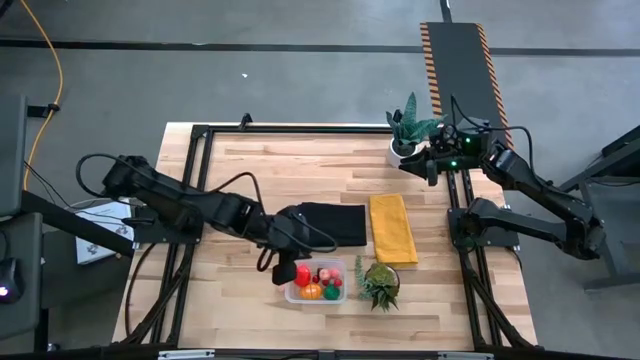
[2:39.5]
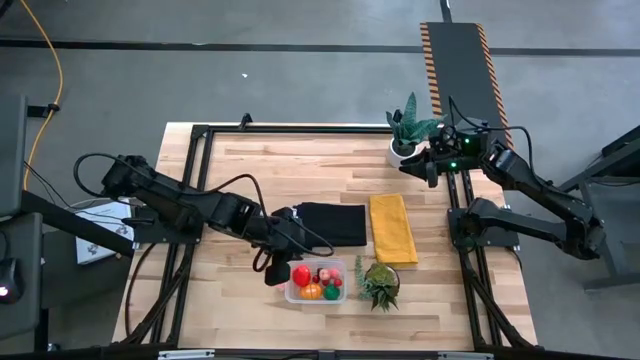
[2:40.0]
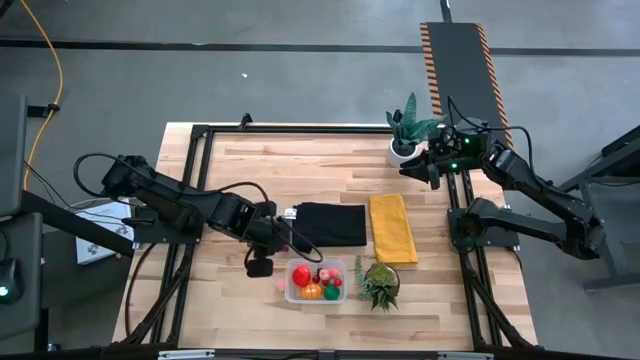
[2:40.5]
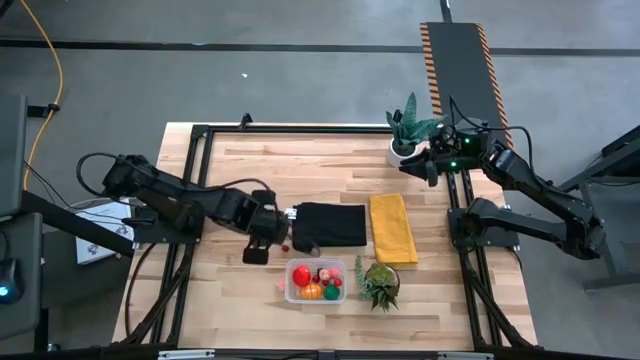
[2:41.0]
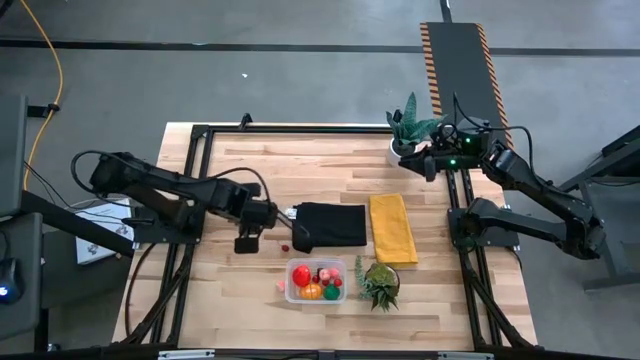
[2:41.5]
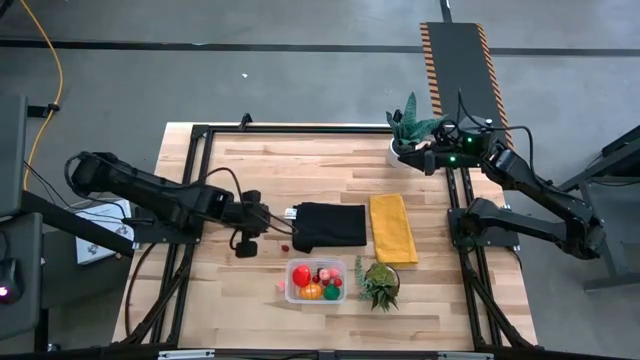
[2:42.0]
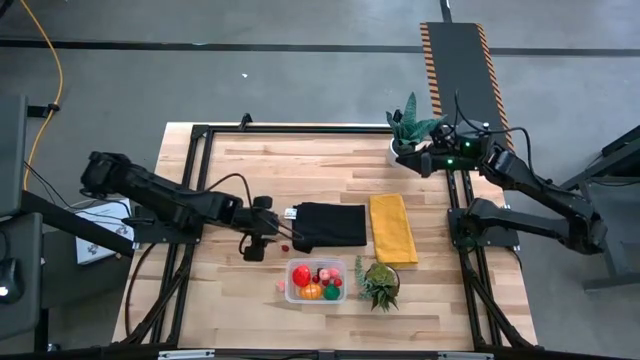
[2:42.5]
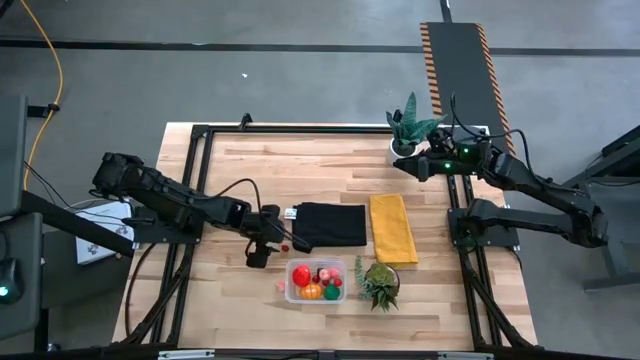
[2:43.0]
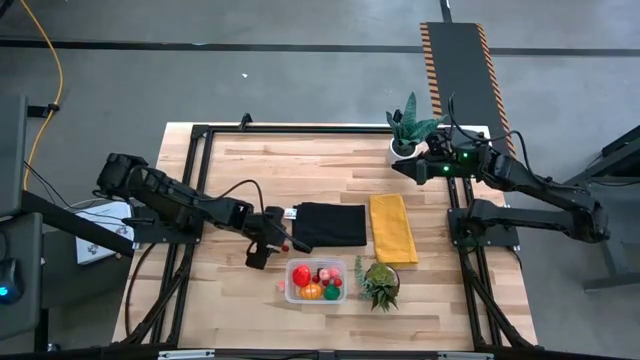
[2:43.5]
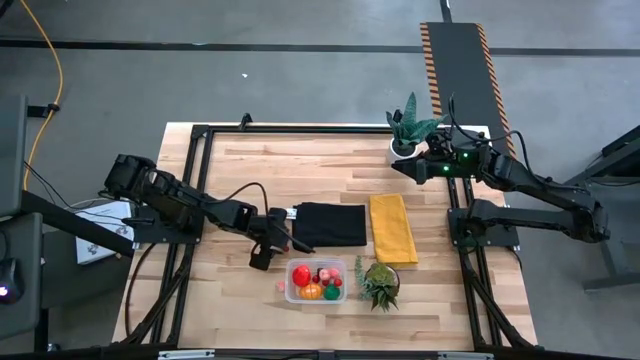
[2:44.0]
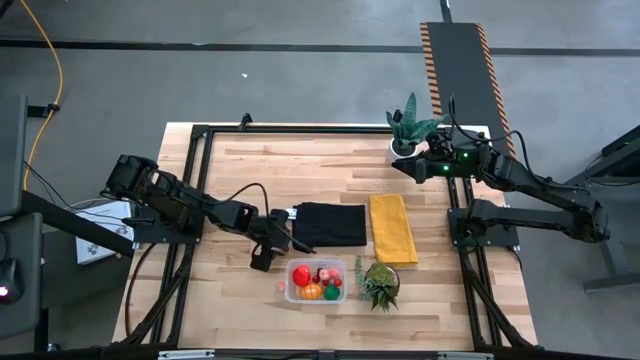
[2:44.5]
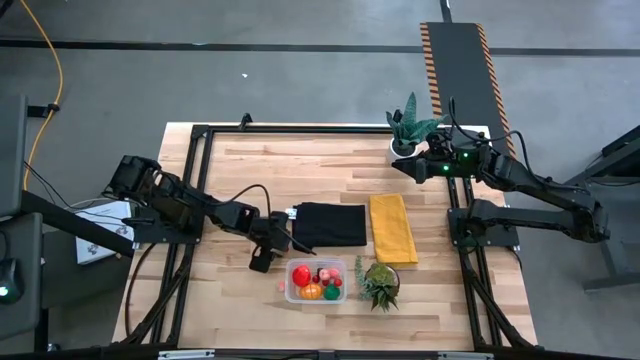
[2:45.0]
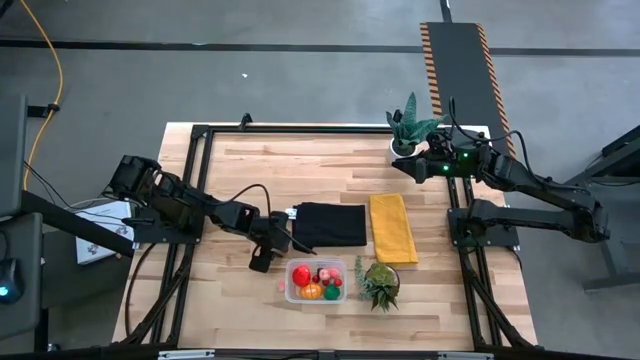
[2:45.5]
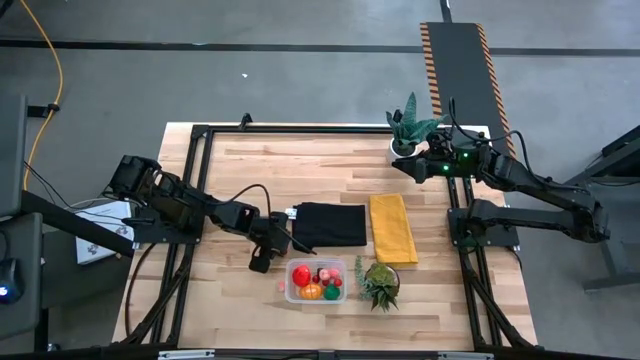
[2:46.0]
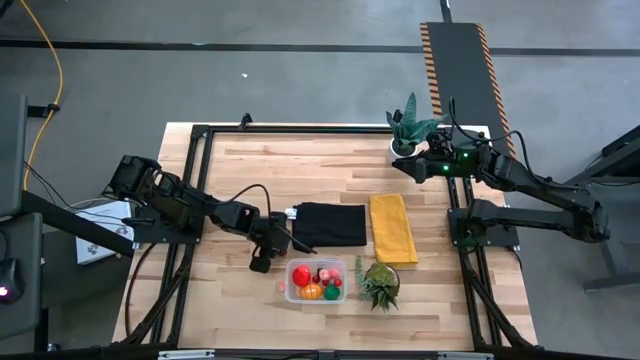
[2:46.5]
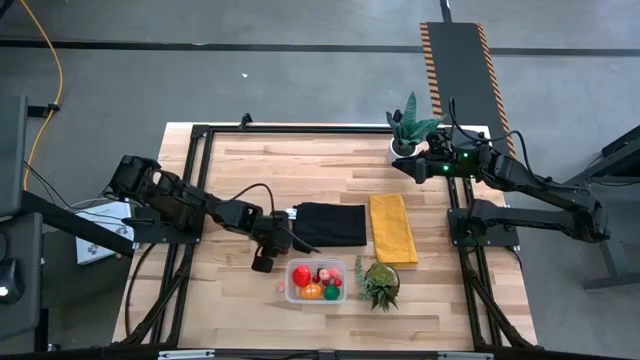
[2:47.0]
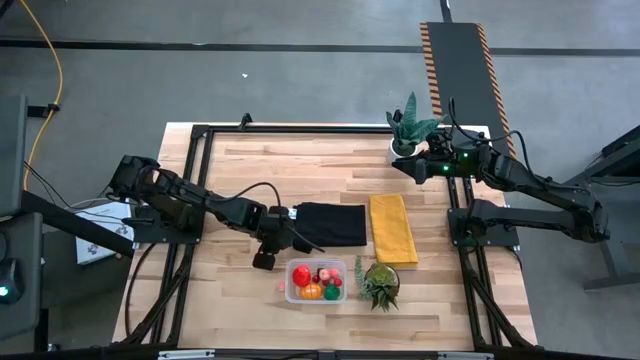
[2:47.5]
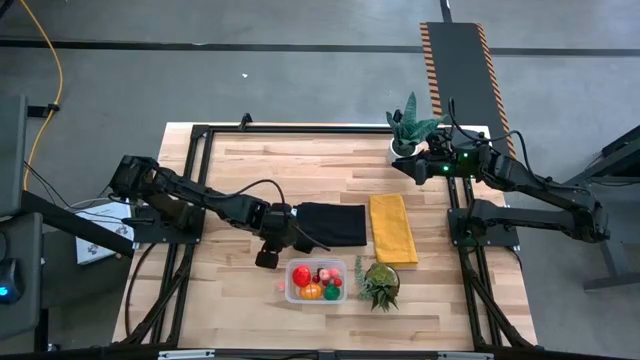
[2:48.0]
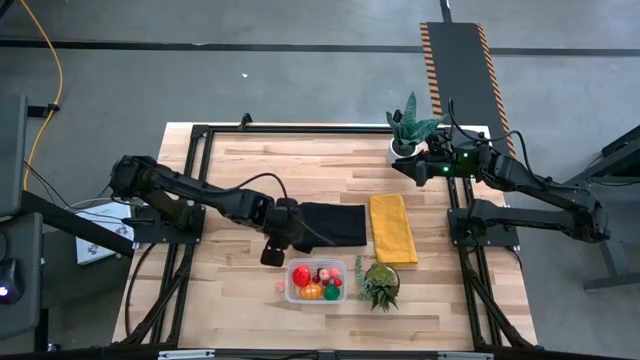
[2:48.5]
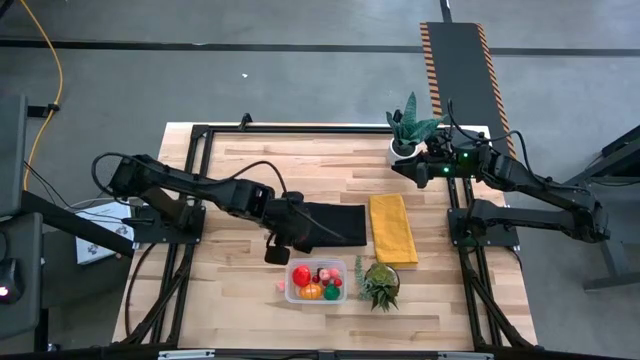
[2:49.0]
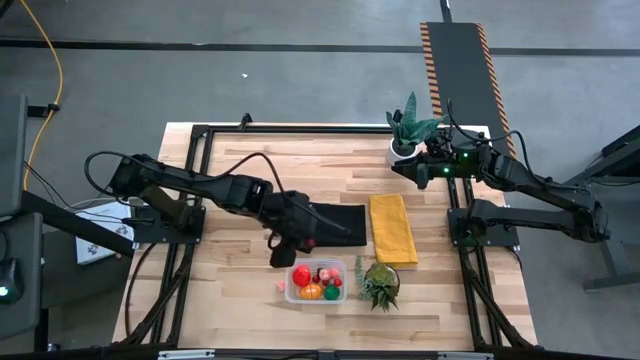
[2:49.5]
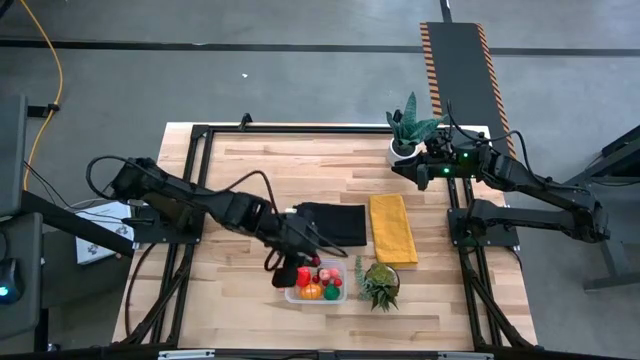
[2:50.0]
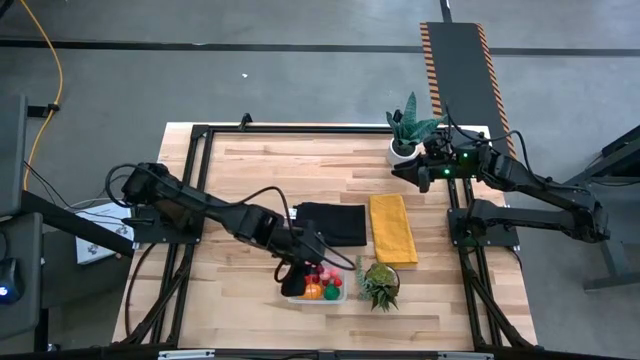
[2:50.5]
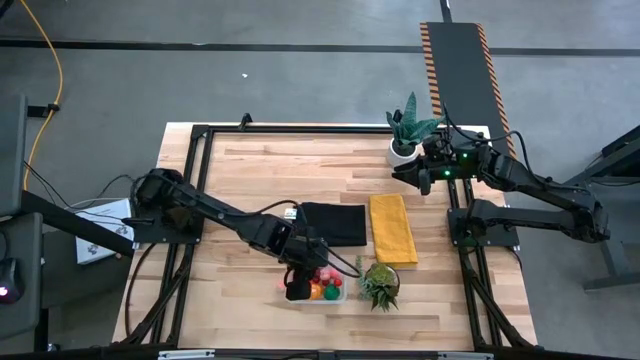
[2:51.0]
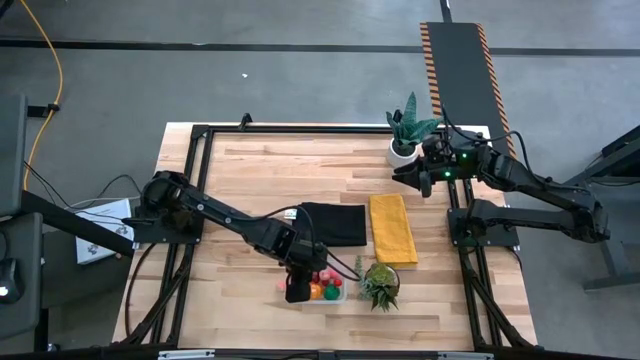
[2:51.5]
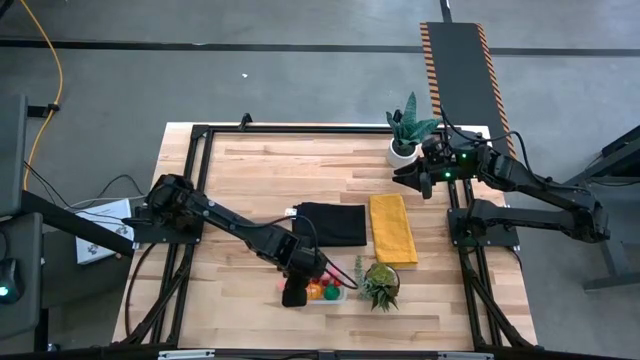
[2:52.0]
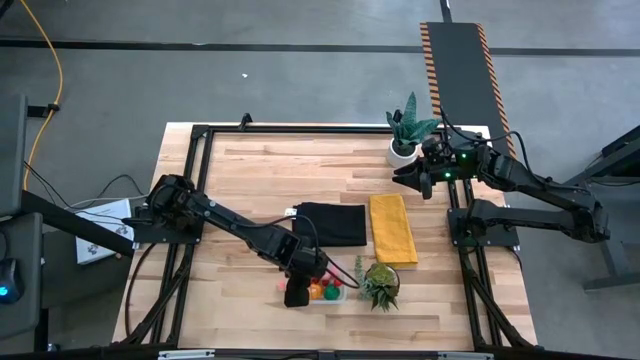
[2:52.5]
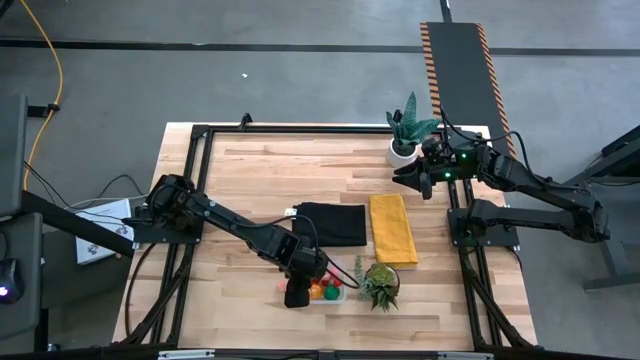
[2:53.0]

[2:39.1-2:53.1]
Task: Pick and placing Produce into tupperware
Put the red cherry into the transparent bin

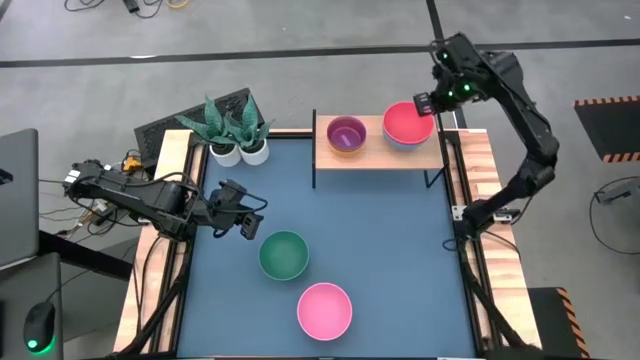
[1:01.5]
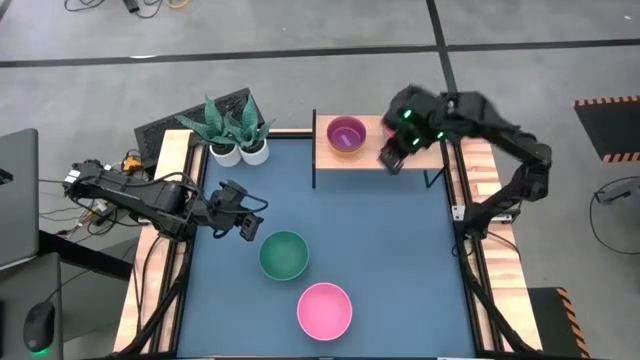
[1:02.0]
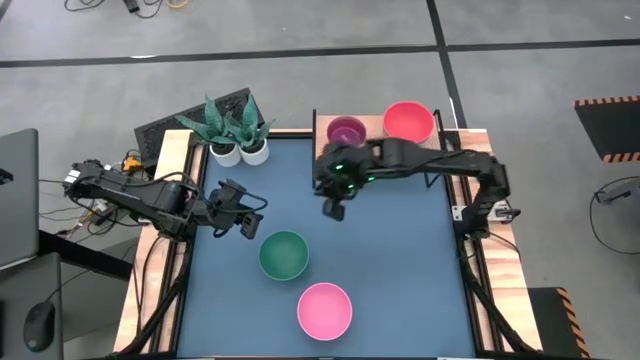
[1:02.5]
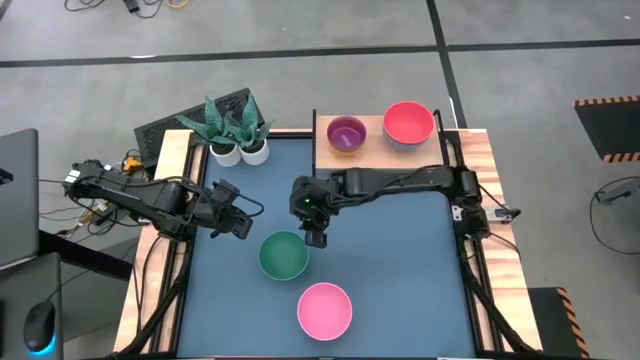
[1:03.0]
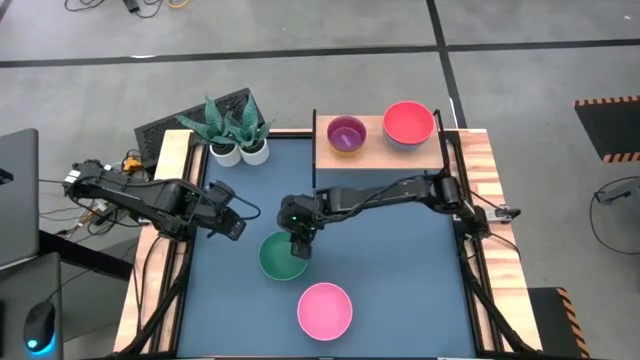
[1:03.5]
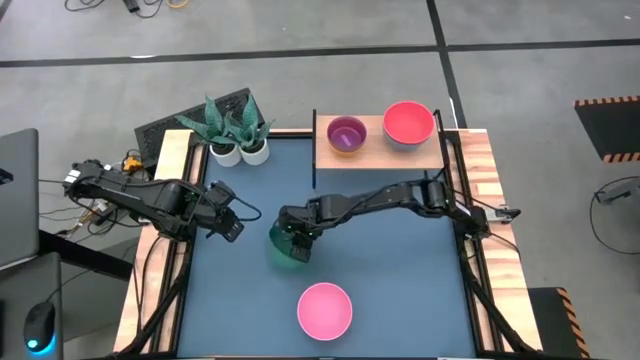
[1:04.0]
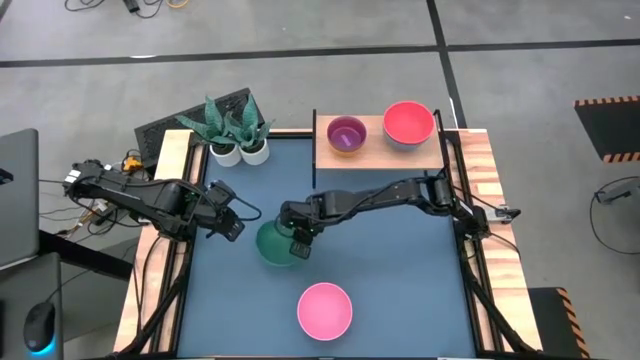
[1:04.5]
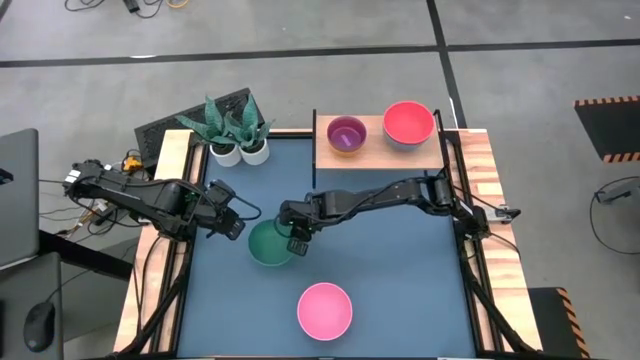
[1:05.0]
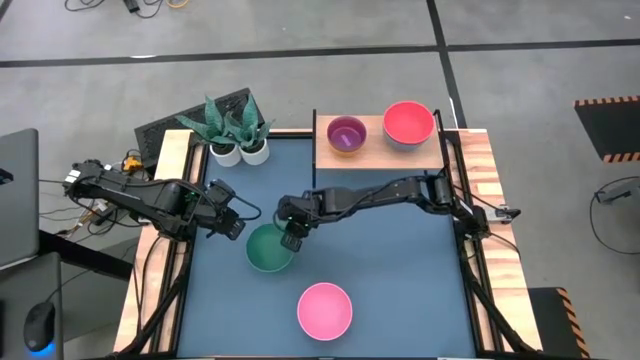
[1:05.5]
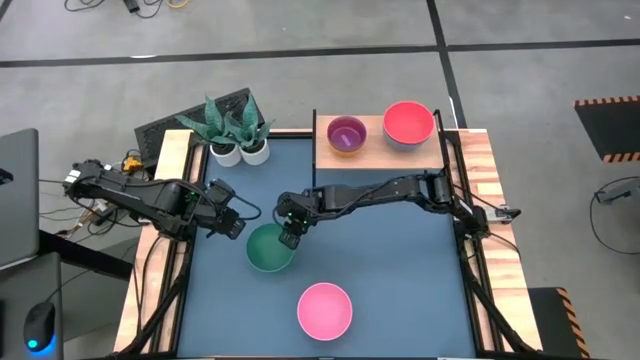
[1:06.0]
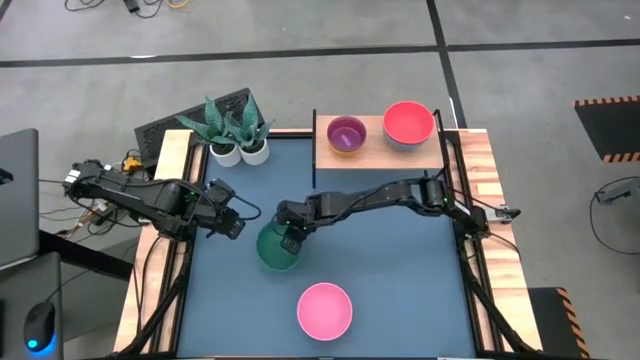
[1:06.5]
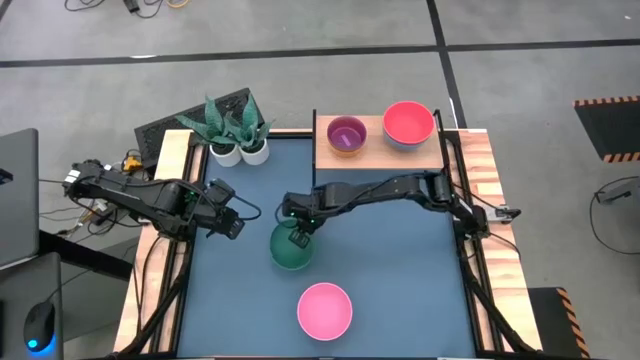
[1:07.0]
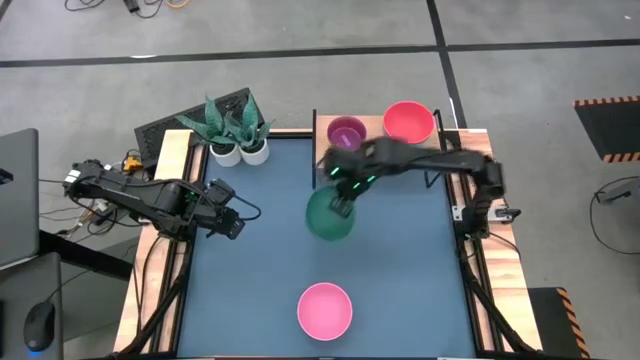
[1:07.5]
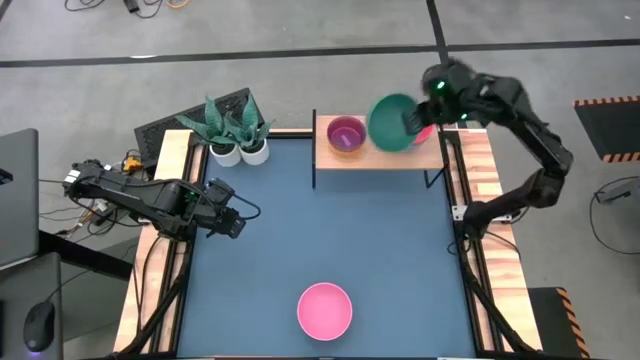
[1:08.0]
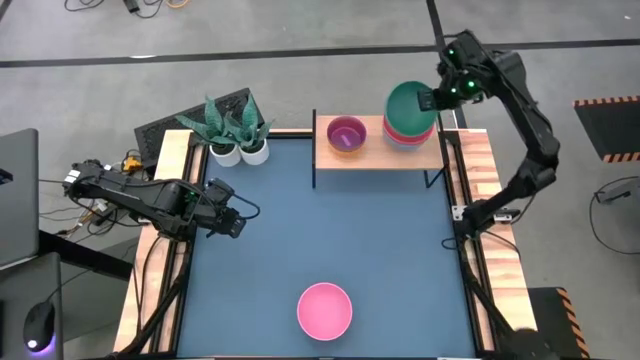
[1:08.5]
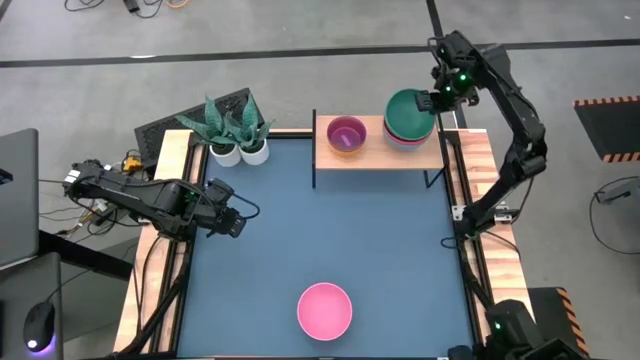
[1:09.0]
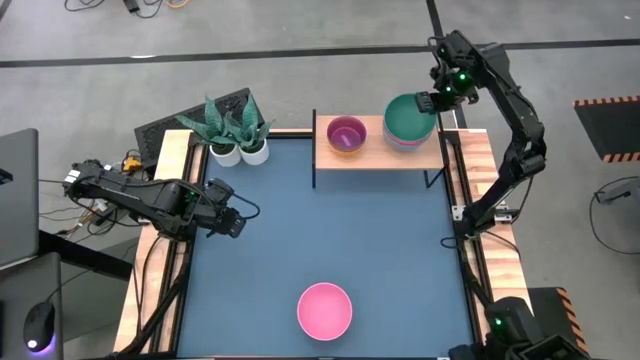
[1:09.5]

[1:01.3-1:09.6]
Task: Place and stack bowls onto a shelf
Stack the green bowl on top of the pink bowl on the shelf
